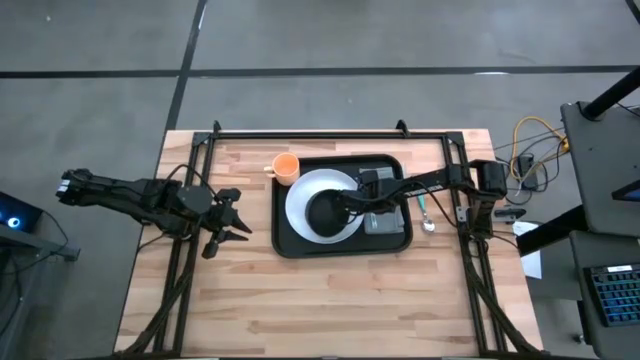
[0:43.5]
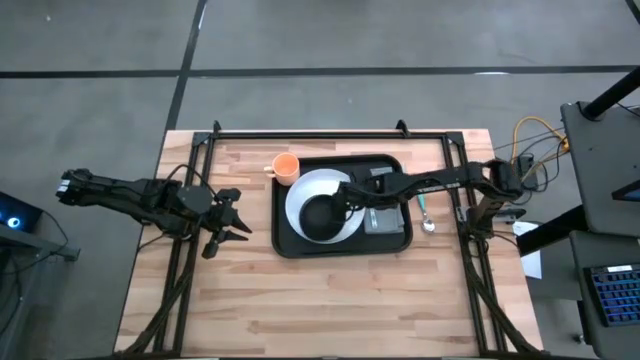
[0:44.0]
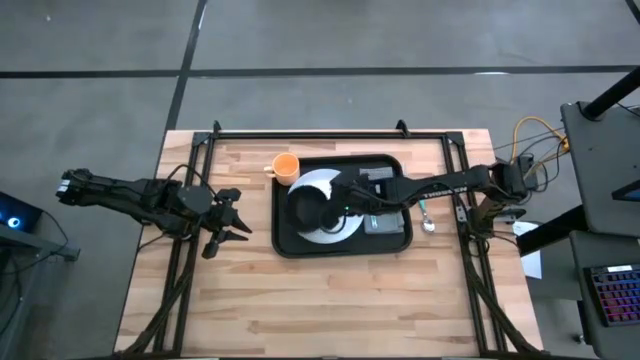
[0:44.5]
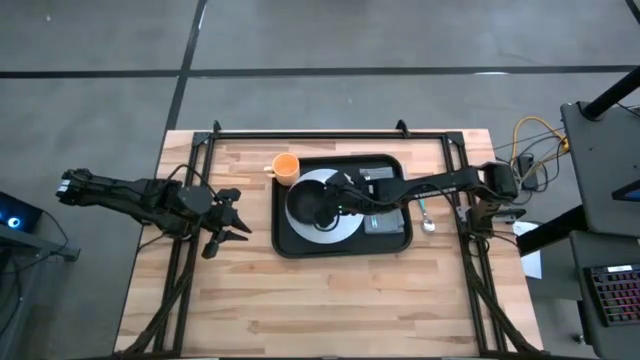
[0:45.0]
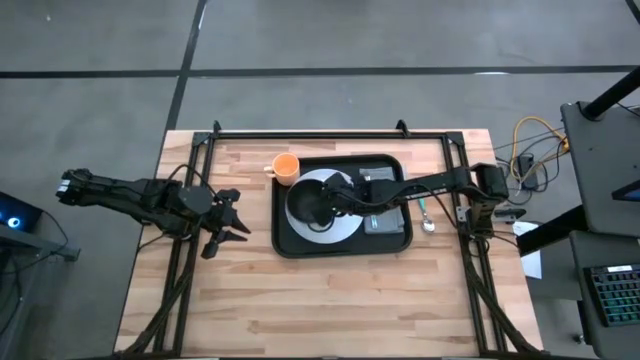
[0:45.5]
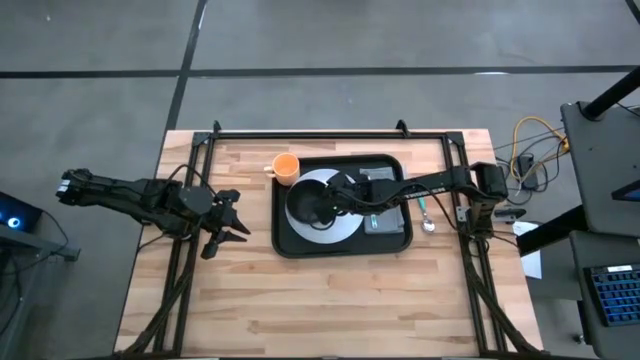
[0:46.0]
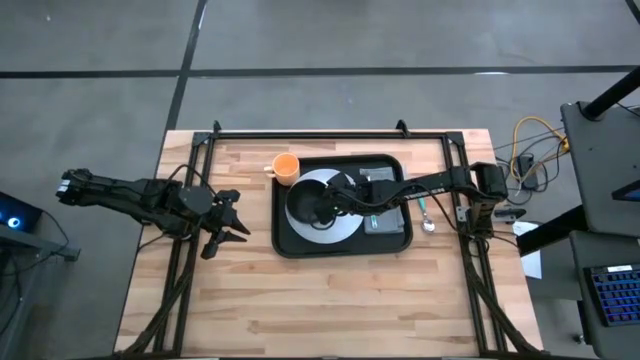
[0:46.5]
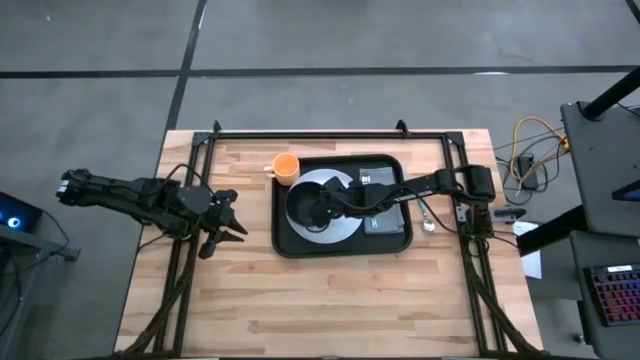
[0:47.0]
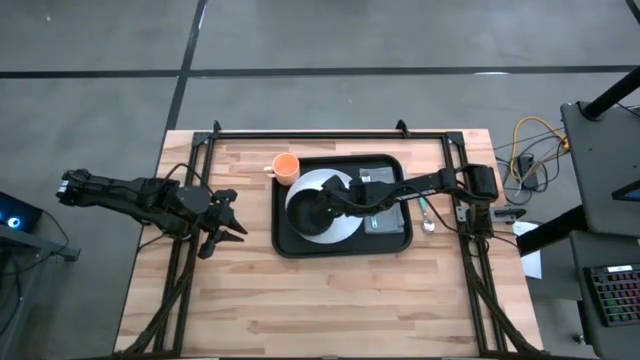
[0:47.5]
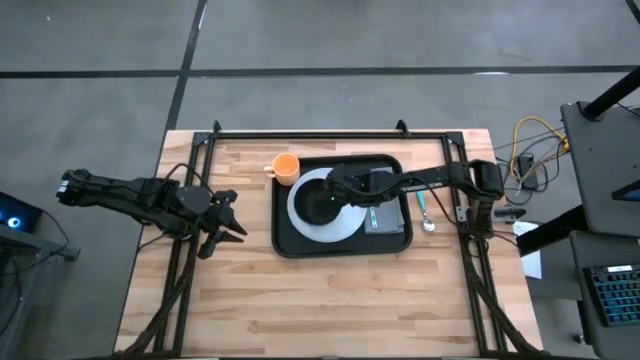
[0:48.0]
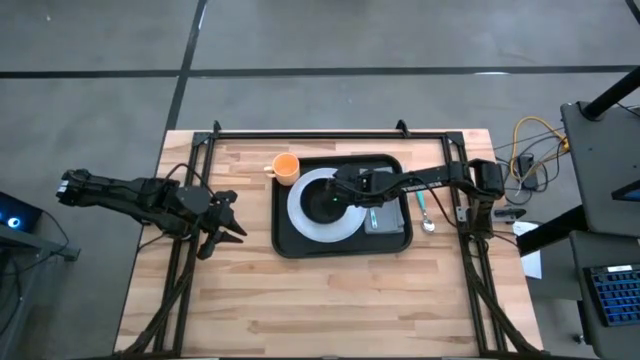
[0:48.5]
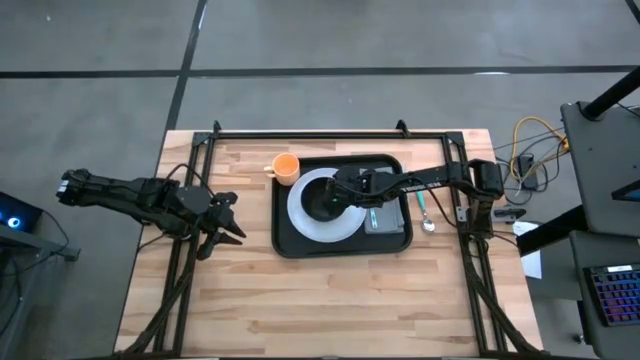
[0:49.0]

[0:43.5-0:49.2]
Task: Set up tray
Adjust the black bowl on the white plate

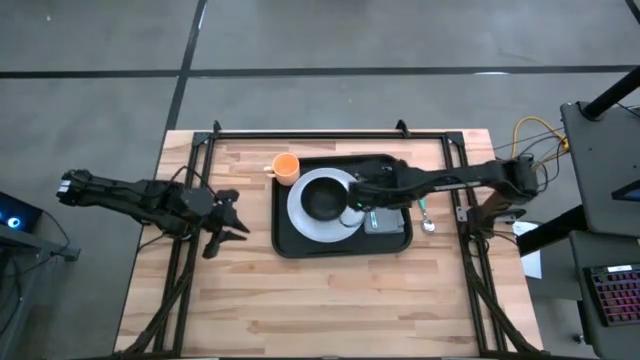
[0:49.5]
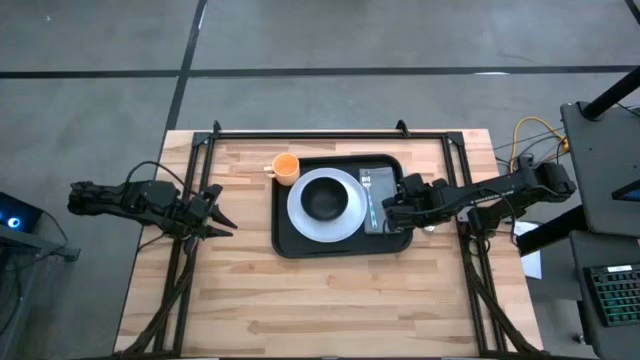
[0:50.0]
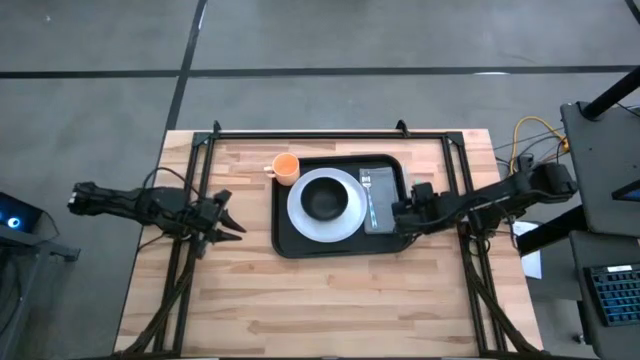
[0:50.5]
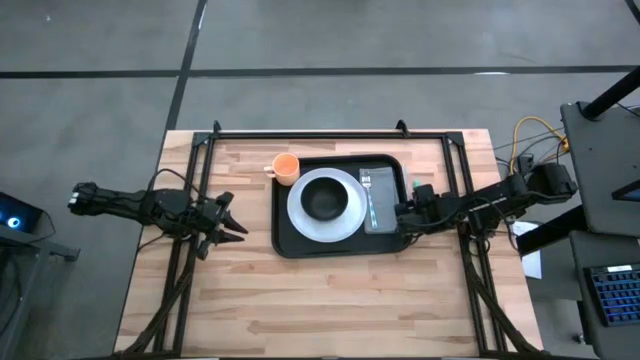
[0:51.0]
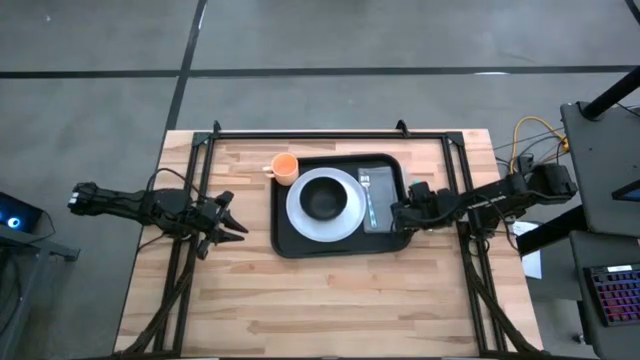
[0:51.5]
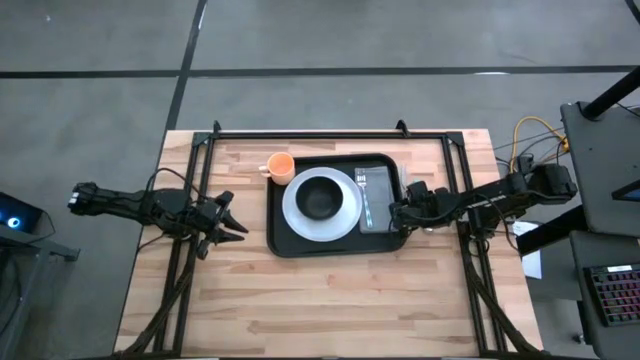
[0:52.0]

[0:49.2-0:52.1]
Adjust the black tray on the table

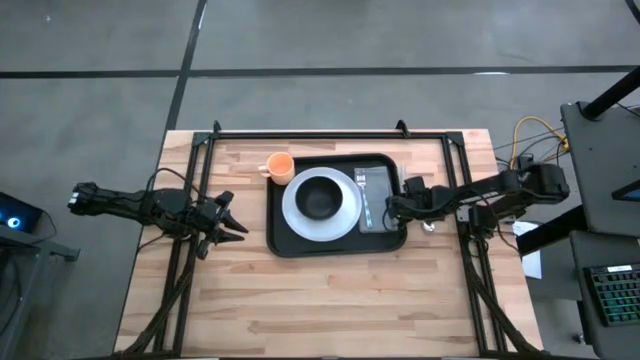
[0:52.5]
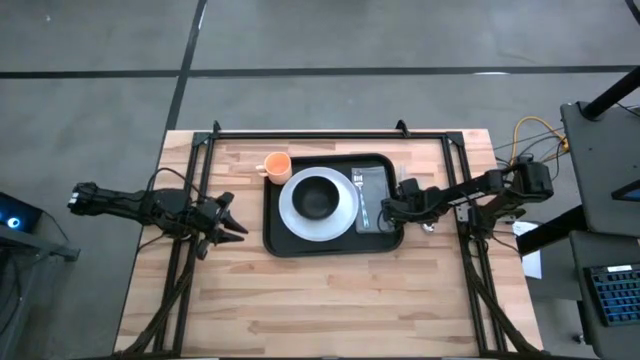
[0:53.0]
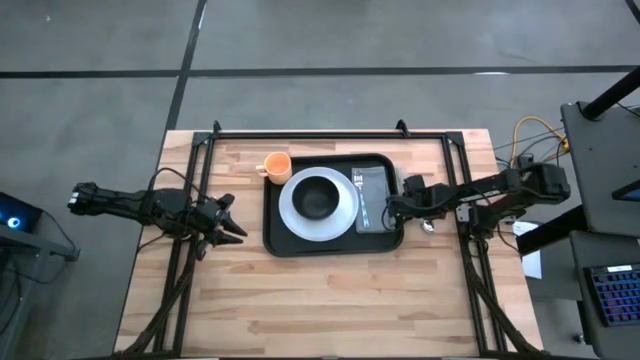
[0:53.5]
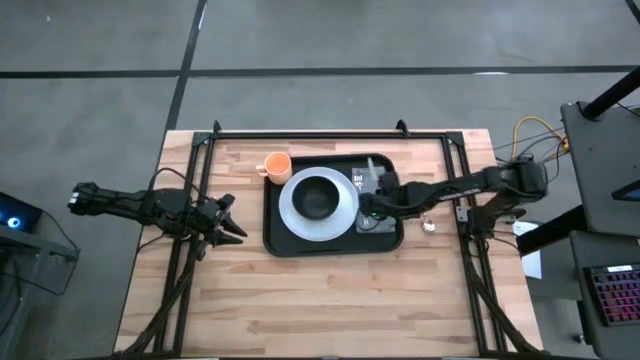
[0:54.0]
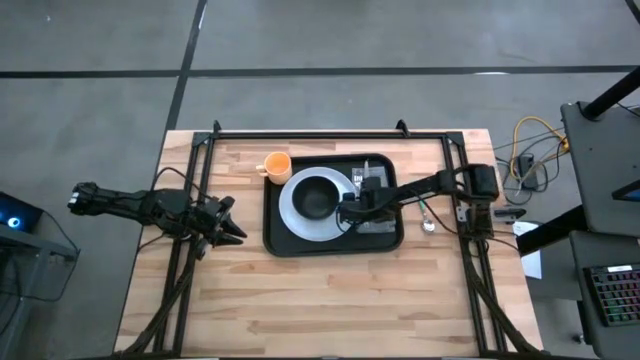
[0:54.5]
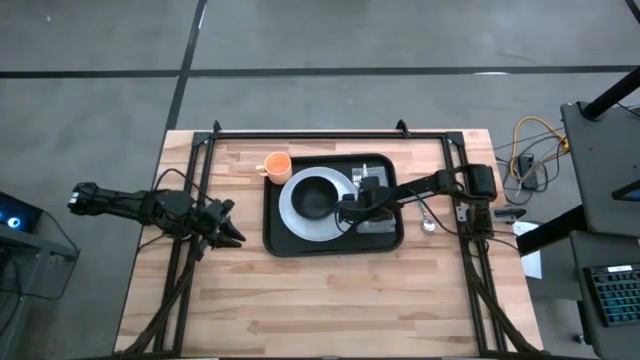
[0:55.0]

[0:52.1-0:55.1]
Put the white knife on the gray napkin to the right of the white fork

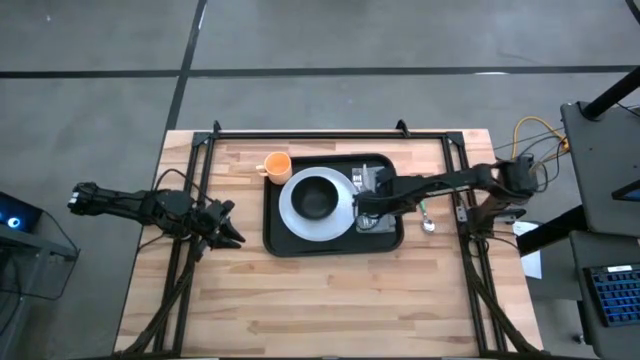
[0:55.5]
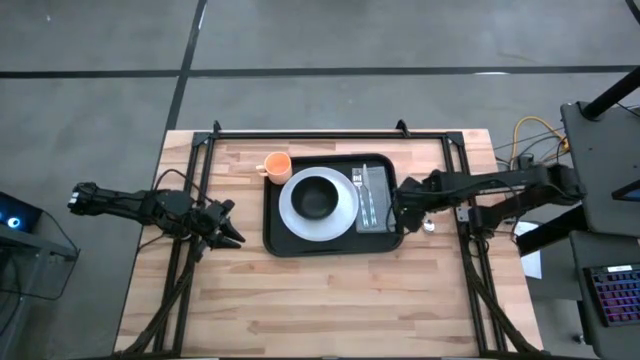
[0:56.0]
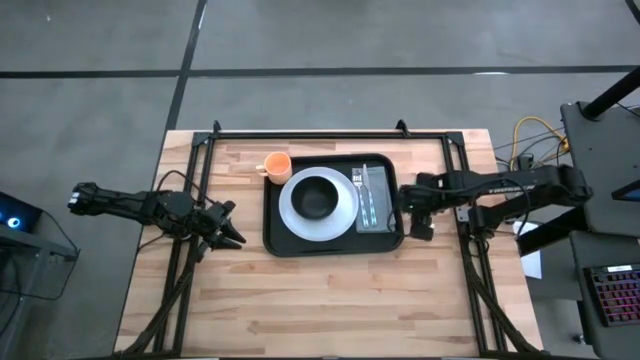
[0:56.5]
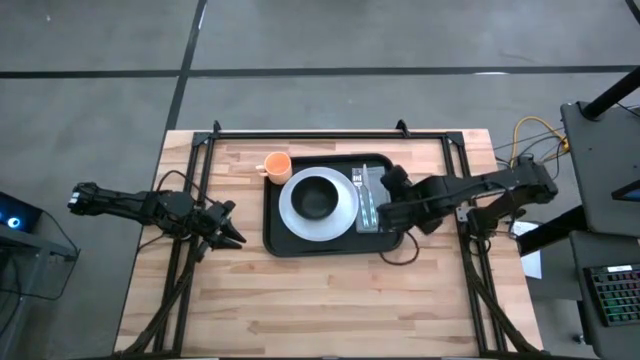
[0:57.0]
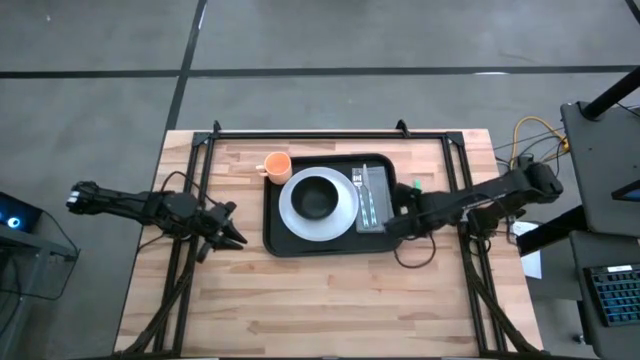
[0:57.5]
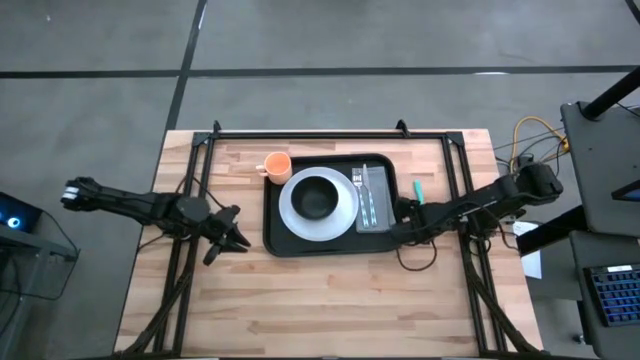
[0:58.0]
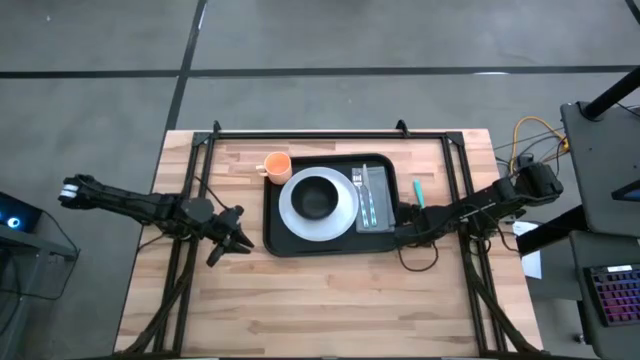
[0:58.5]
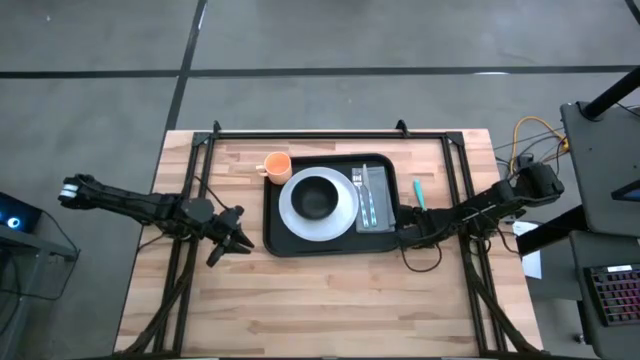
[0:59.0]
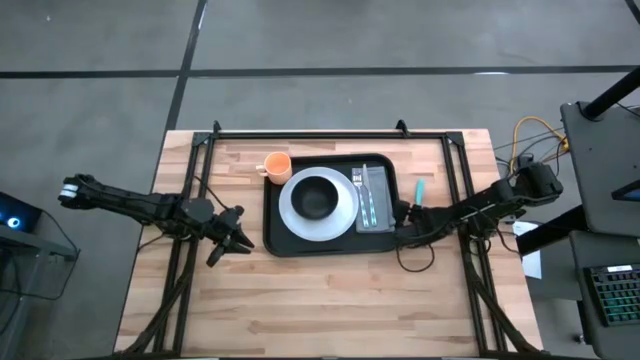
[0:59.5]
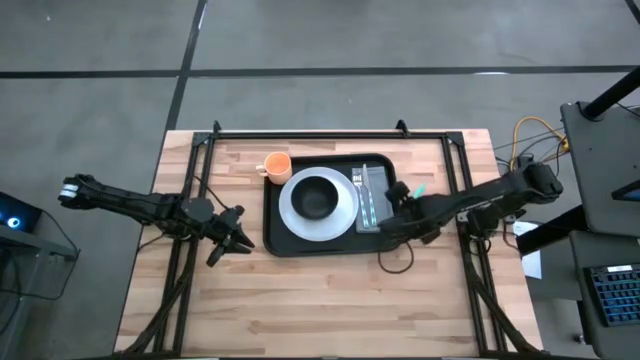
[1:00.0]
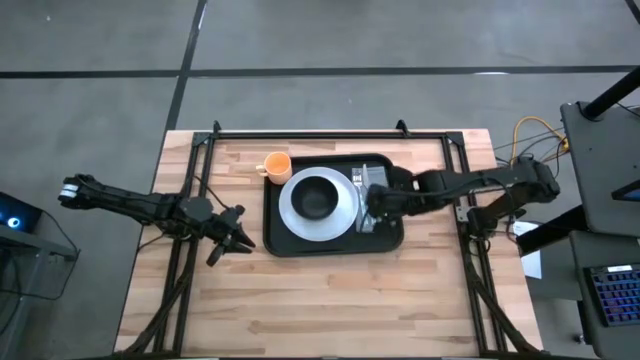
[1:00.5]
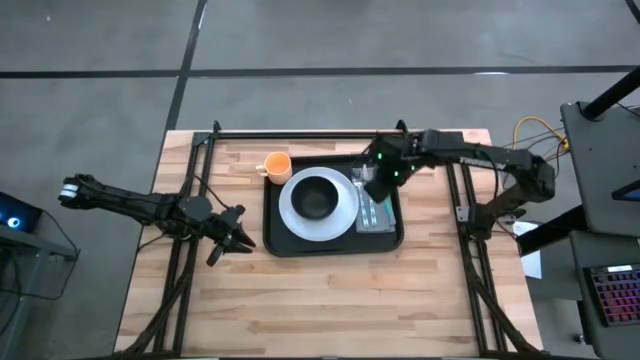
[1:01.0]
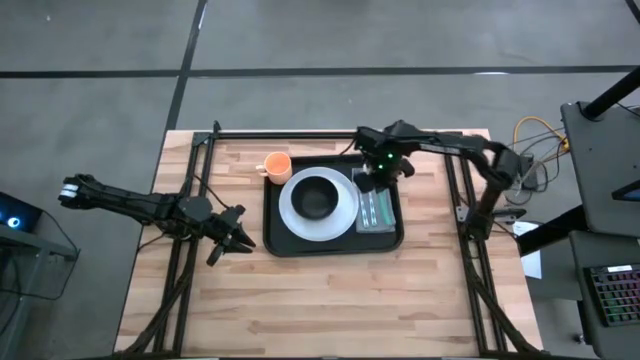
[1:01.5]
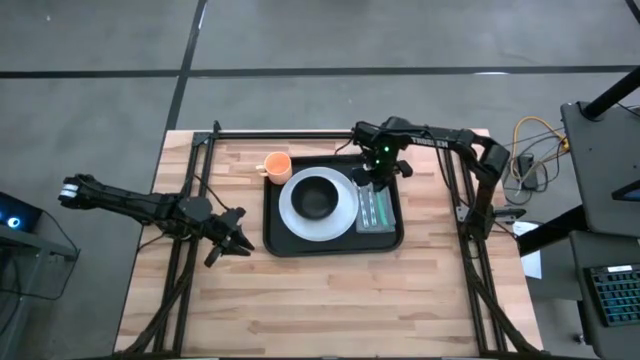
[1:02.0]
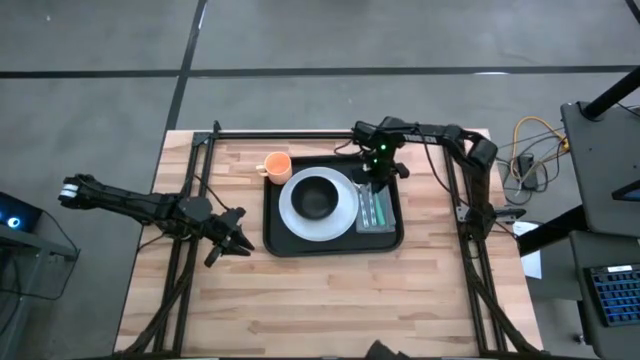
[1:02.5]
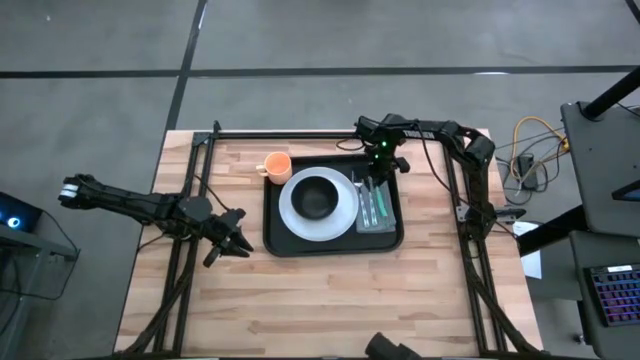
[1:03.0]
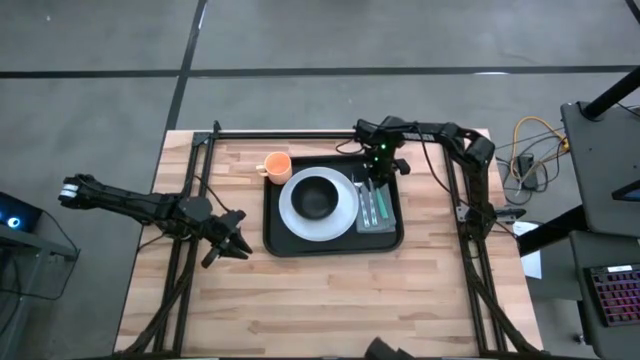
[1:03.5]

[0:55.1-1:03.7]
Put the white spoon on the gray napkin to the right of the white knife

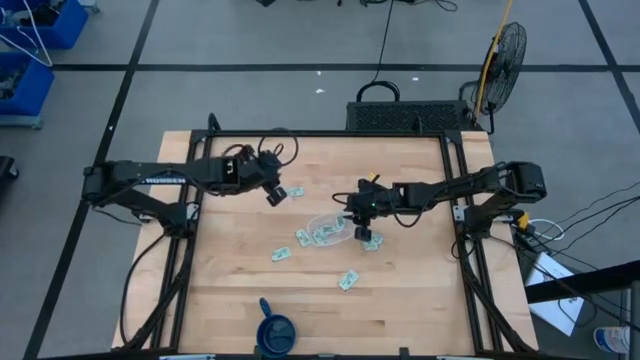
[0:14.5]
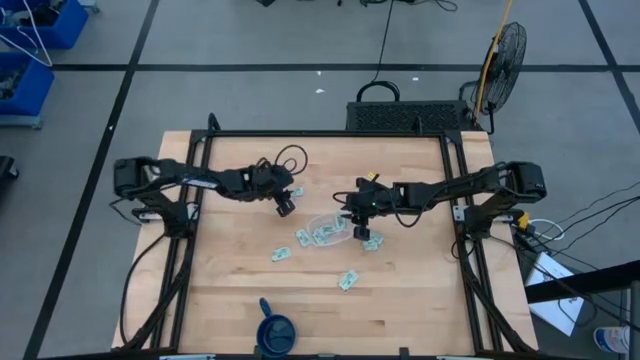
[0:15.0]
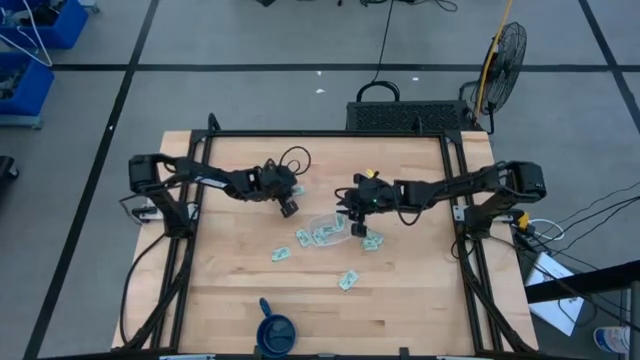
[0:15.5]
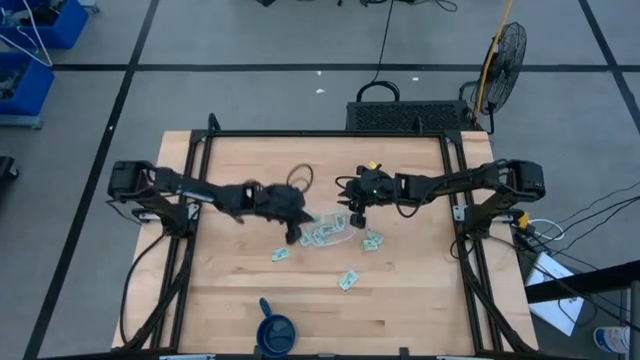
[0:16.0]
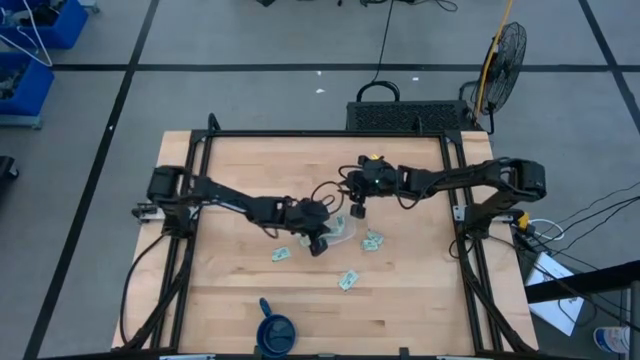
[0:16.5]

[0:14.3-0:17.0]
Task: Pick and place Stevia / Truvia into bins
Put the stevia packet into the transparent container
